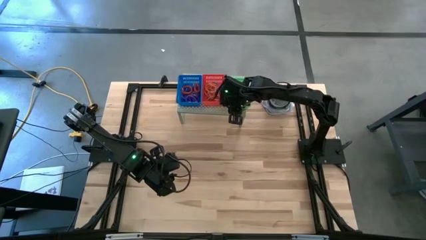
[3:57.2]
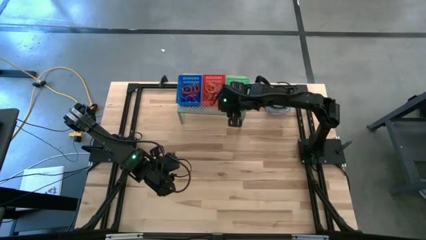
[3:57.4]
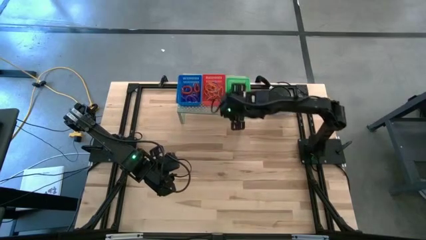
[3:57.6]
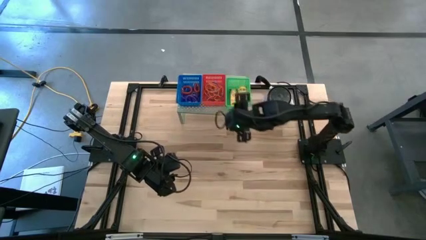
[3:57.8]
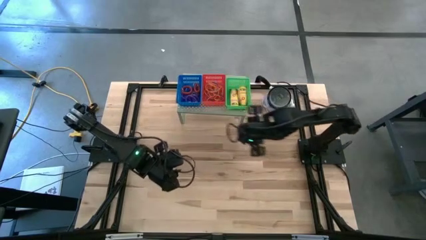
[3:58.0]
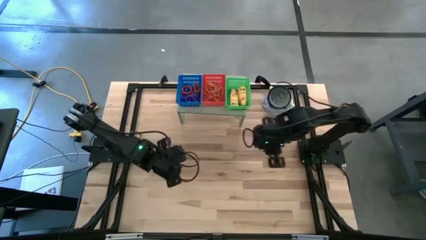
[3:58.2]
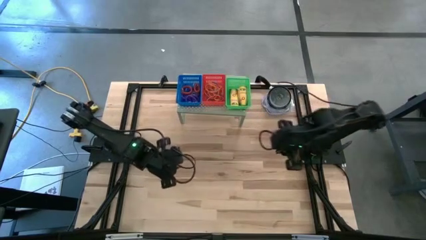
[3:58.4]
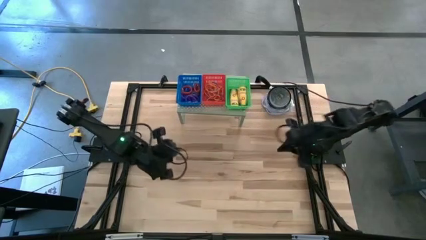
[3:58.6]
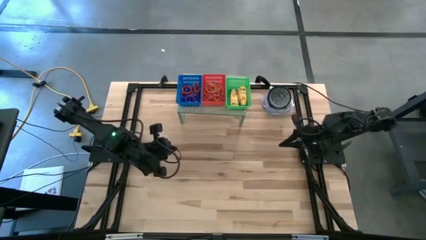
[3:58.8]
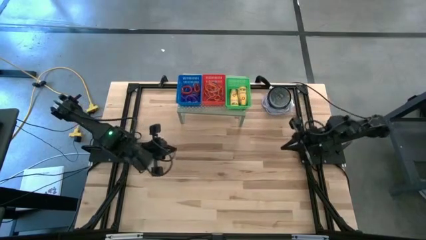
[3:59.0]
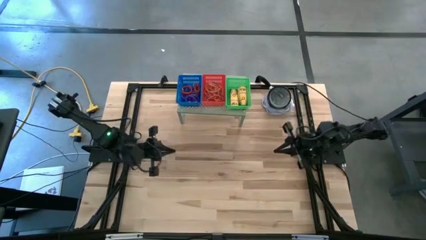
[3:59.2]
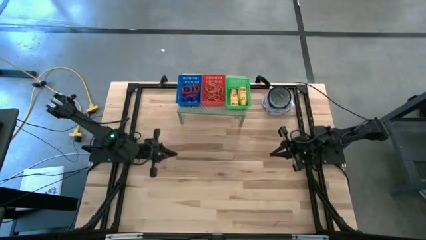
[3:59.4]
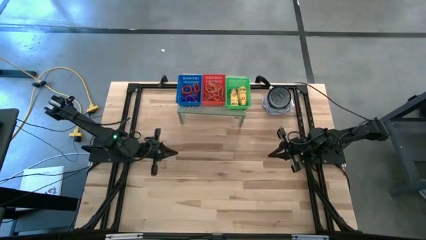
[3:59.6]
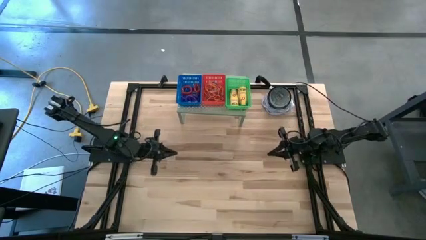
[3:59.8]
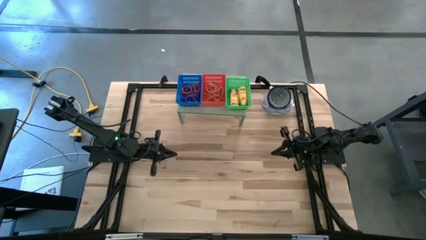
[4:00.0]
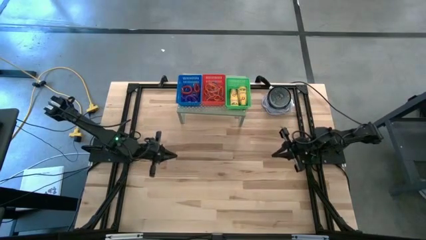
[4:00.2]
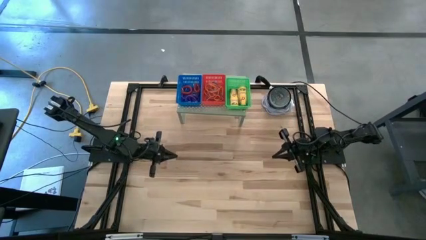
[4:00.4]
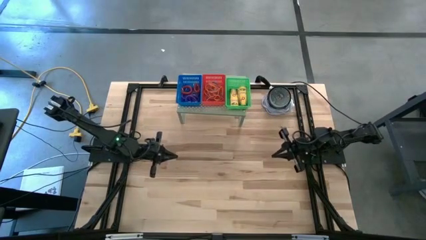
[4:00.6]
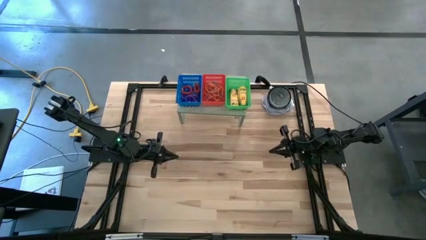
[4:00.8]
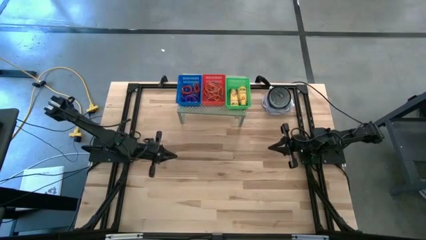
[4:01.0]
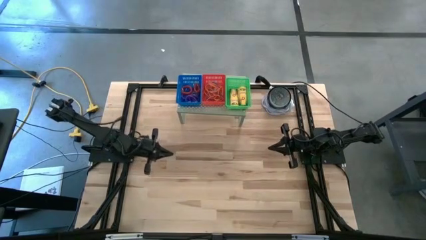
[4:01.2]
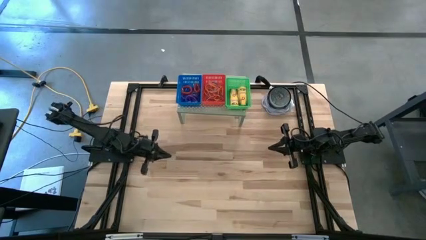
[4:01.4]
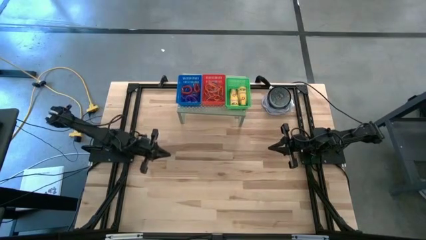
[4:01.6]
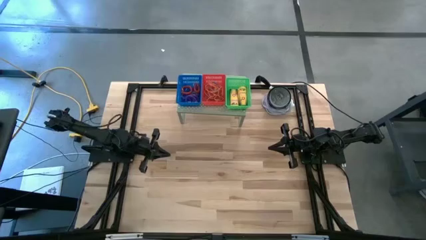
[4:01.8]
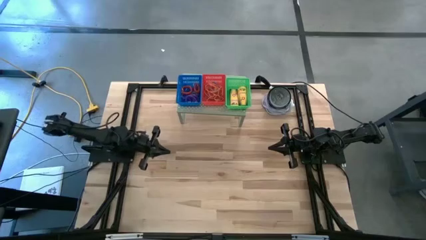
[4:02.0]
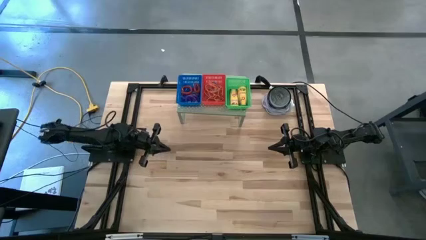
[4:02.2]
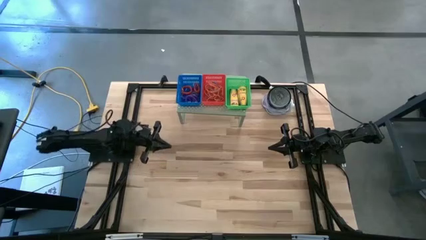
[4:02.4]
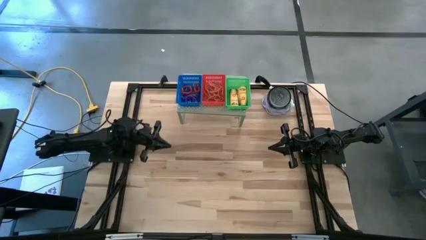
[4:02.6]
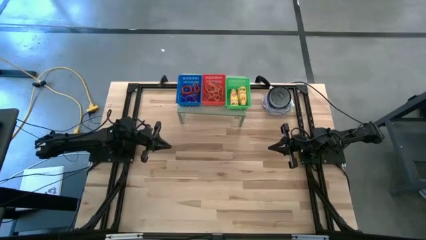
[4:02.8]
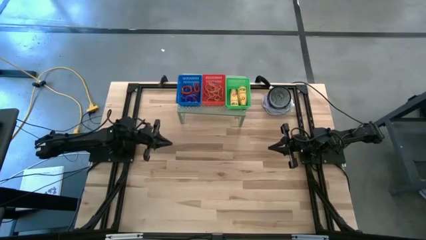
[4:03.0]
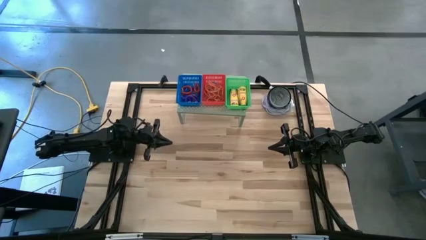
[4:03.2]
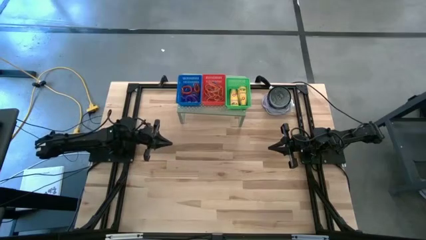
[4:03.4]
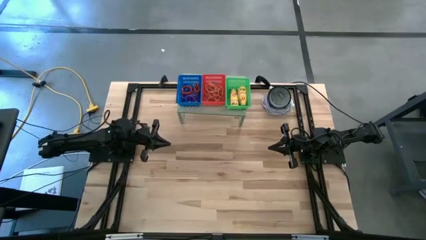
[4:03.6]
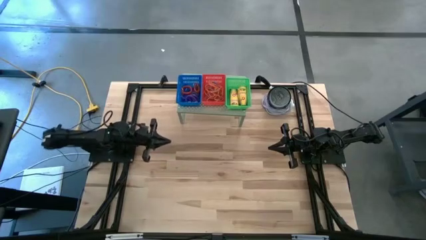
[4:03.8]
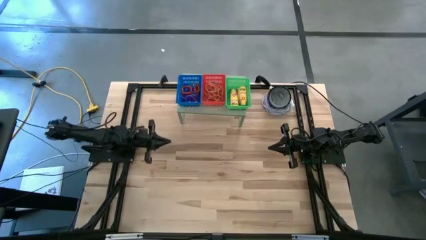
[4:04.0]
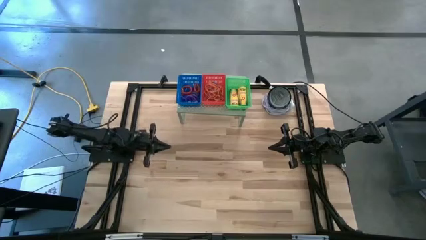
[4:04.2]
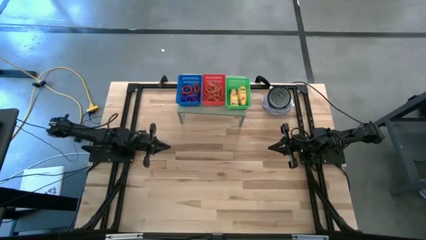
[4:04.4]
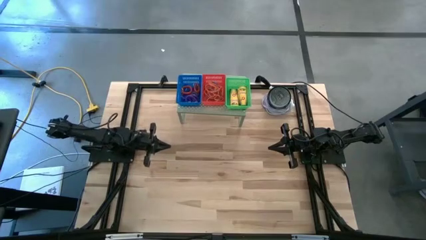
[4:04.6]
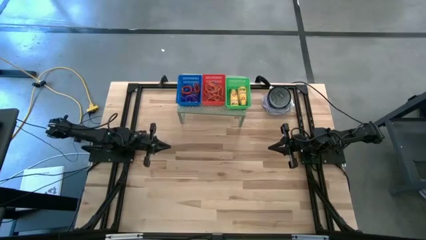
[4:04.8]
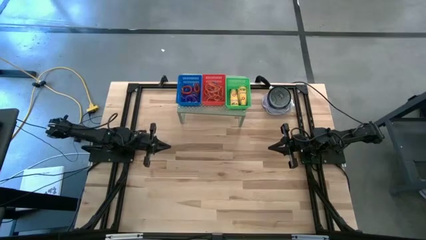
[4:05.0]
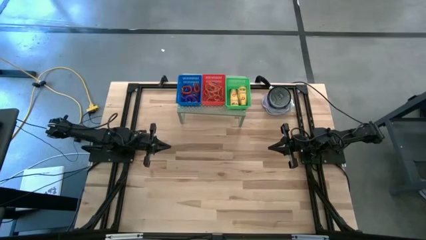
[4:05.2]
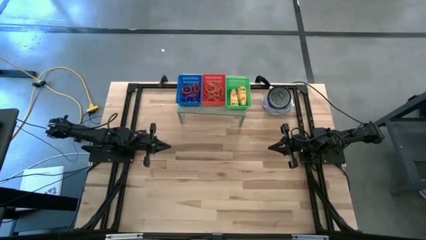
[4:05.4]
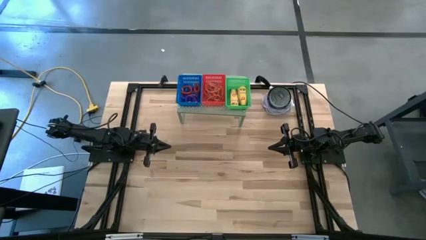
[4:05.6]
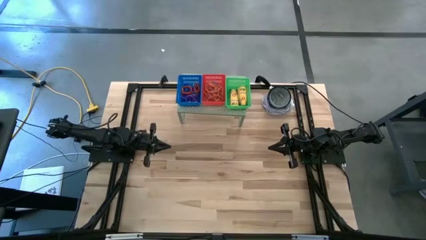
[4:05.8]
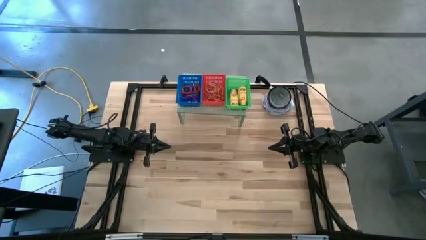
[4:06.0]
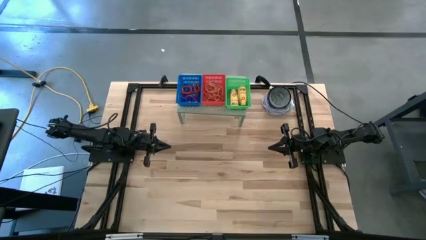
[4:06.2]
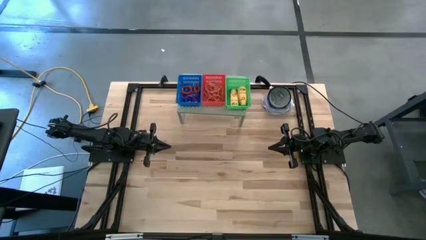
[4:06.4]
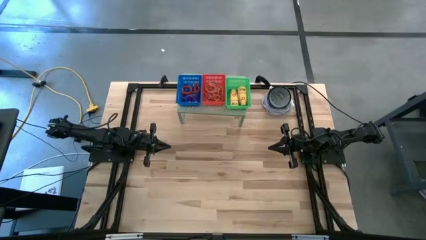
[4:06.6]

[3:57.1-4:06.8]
Task: Pick & Place Office Desk Supplies
Return to Home Position

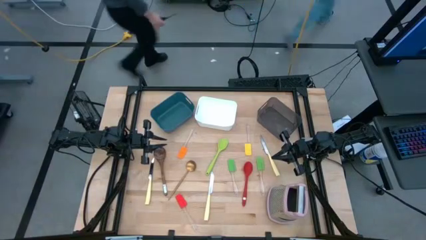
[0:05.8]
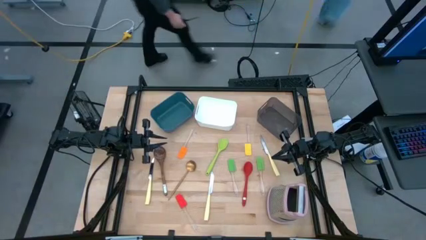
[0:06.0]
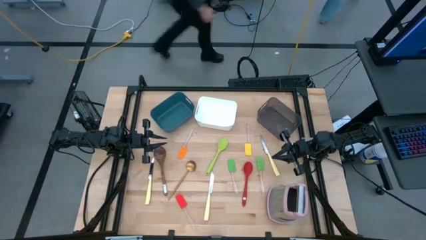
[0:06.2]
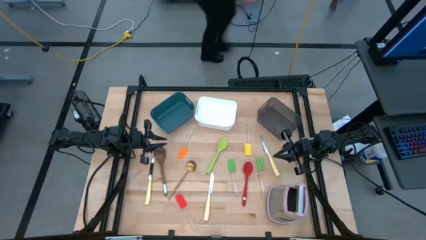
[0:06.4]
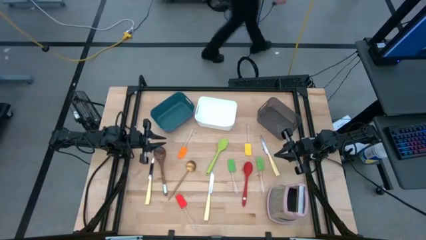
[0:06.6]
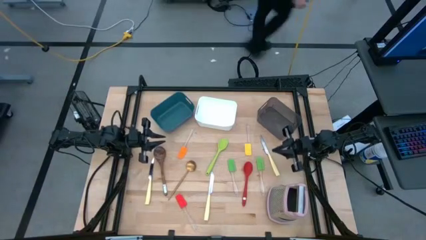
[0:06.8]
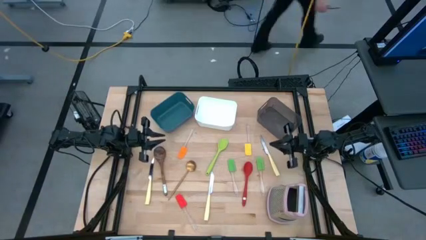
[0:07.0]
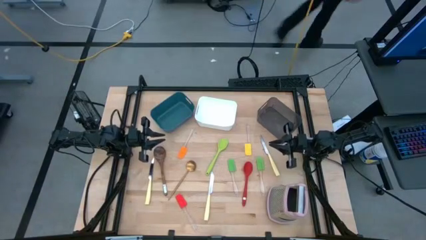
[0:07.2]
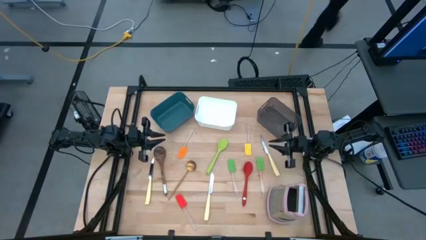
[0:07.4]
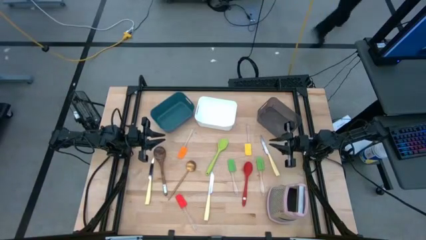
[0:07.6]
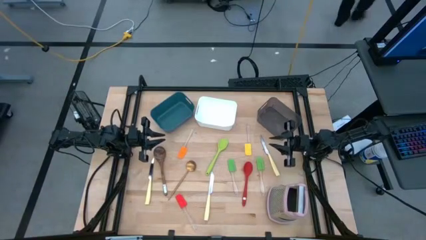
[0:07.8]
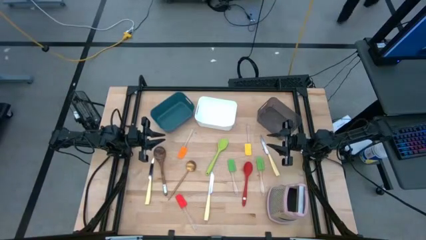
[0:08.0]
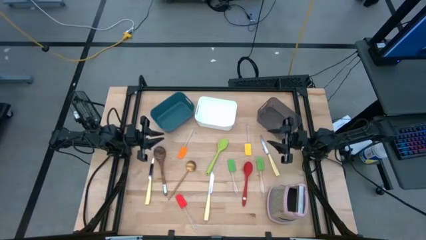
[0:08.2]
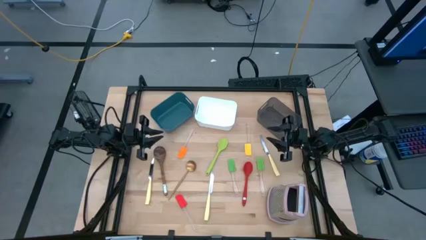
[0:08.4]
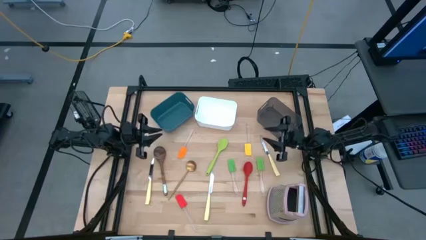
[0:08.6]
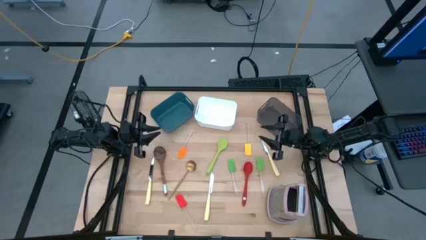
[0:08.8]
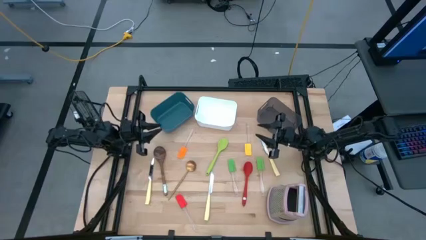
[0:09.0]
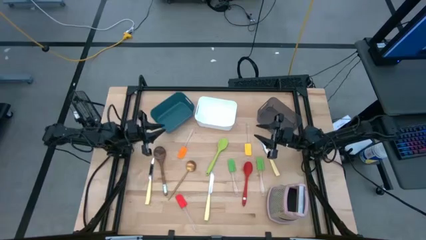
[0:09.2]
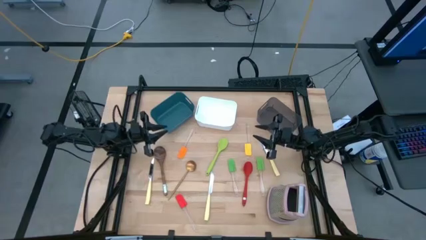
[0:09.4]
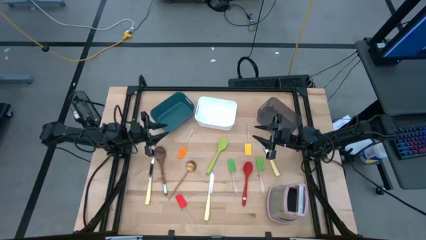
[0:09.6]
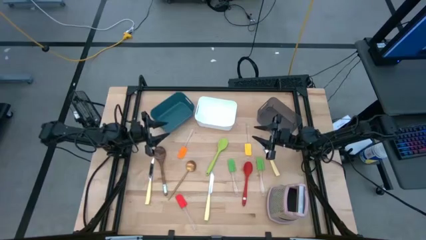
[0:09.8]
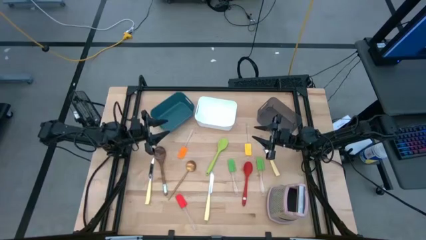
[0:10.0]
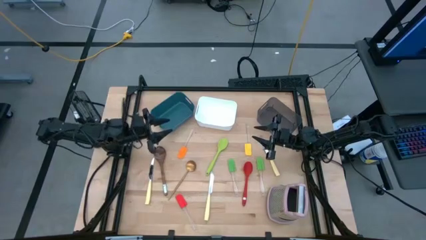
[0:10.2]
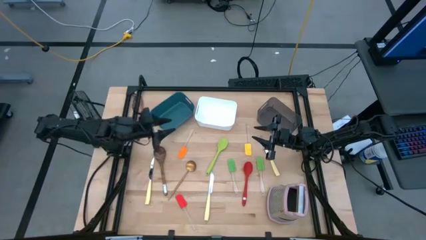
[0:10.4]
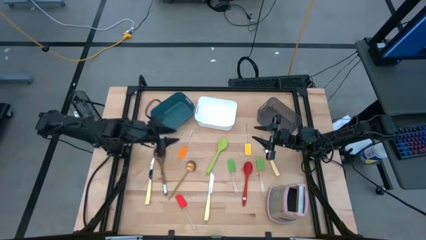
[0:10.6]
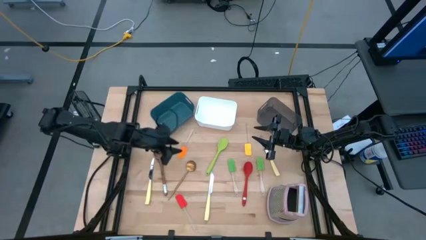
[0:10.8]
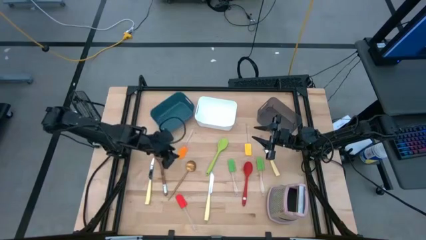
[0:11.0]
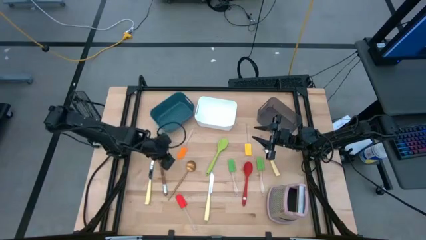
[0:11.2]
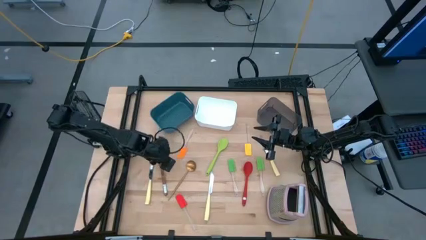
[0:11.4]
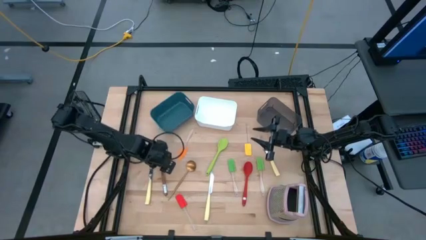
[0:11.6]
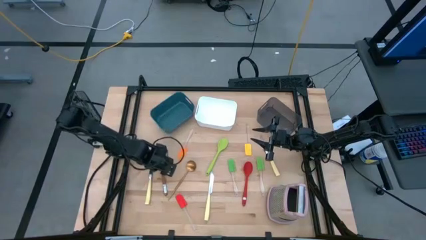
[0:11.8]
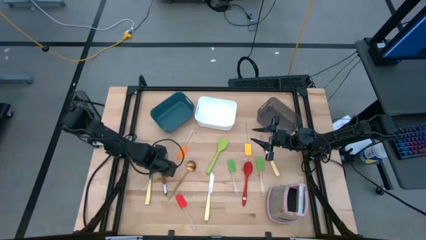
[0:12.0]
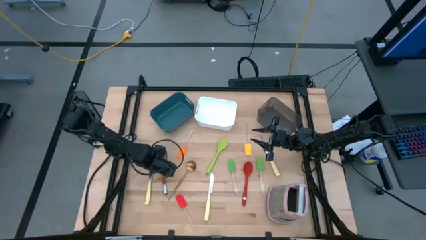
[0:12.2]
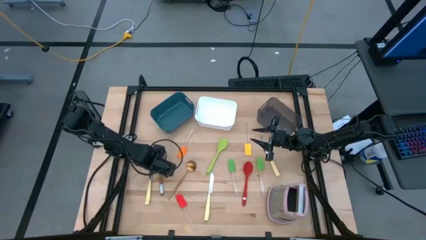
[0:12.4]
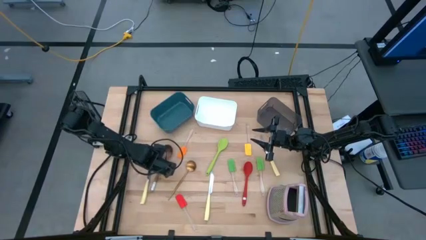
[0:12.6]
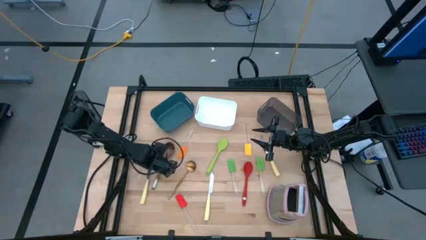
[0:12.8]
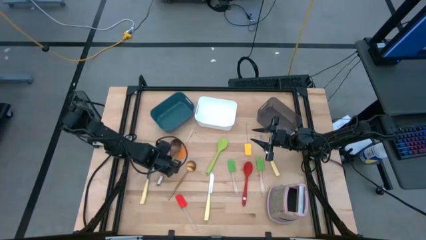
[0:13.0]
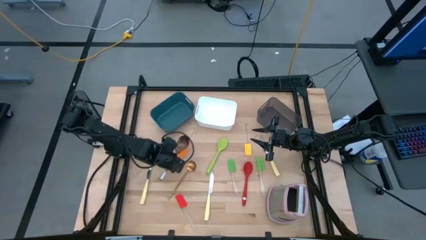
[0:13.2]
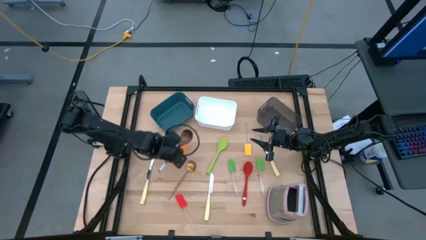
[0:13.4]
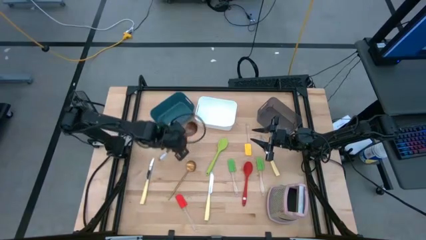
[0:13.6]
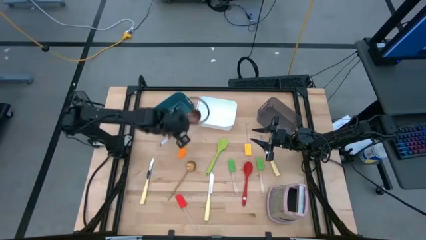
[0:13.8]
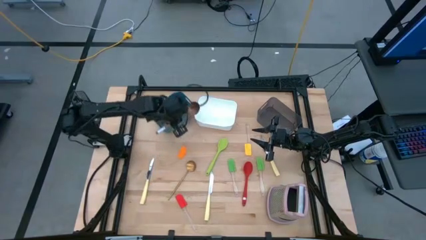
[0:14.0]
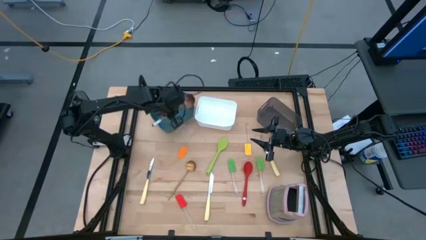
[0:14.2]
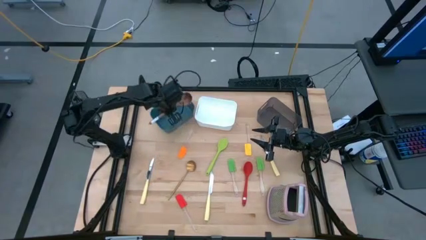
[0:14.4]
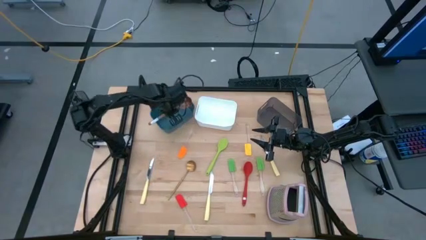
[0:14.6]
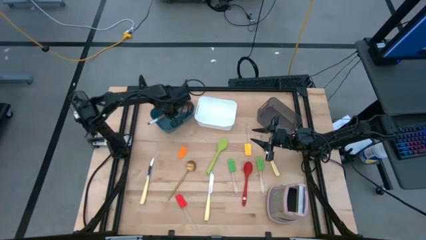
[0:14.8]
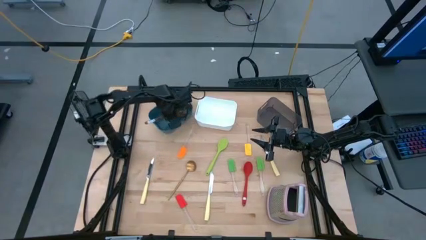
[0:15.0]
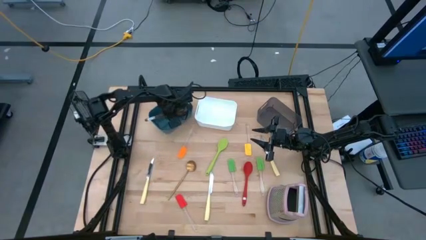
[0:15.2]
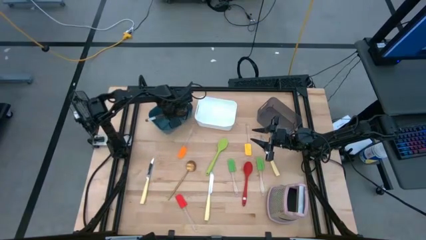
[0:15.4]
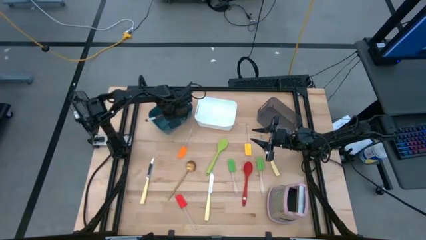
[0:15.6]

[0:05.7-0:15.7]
Task: Pick & Place Kitchen Items
Put the brown serving spoon into the blue bin
